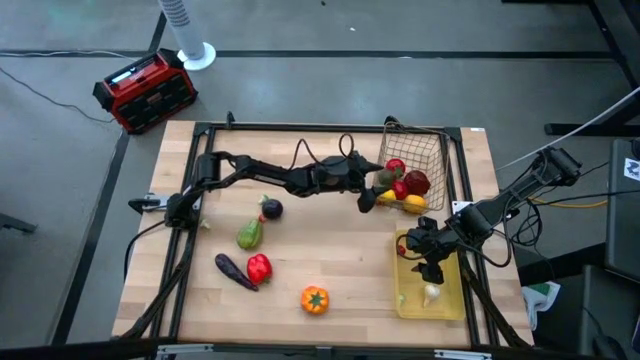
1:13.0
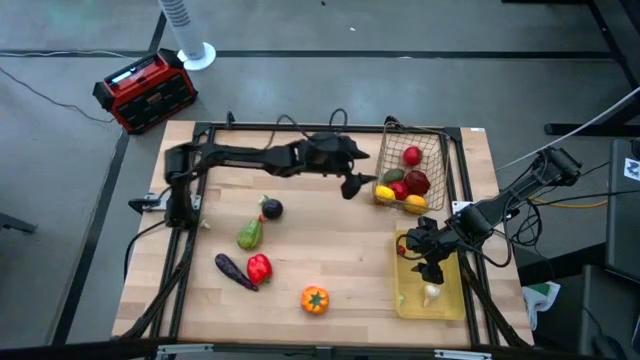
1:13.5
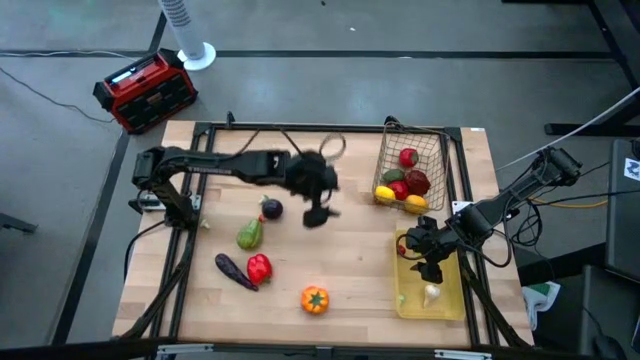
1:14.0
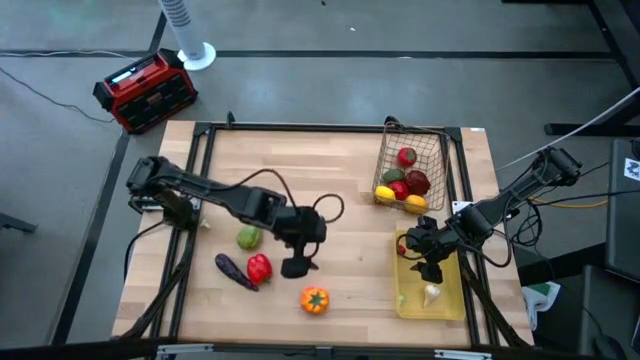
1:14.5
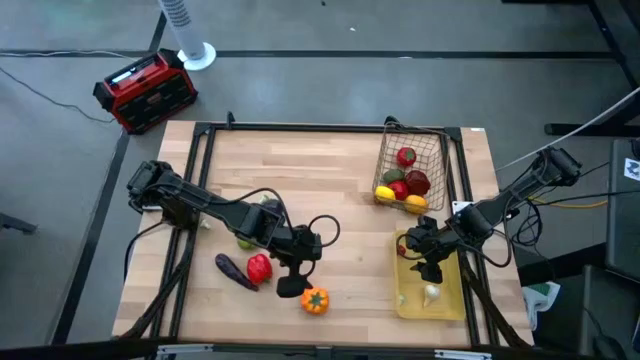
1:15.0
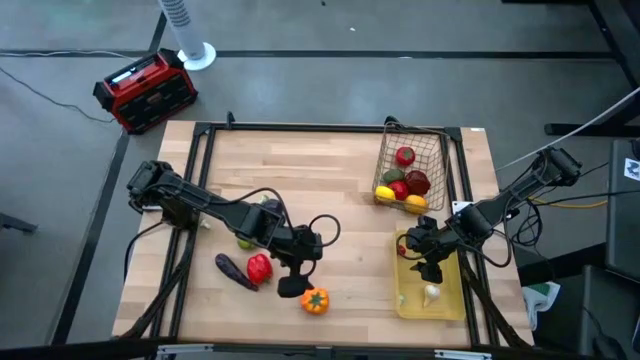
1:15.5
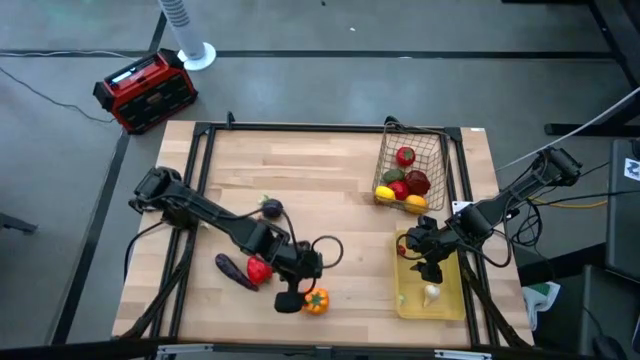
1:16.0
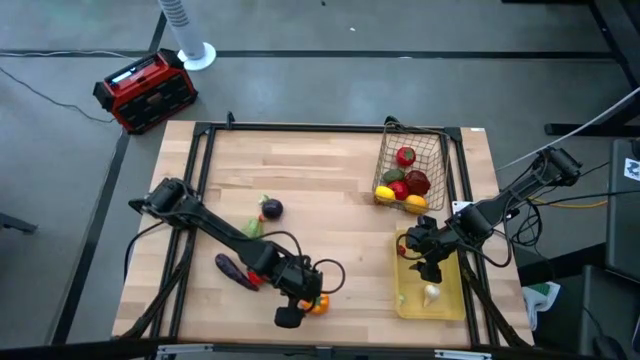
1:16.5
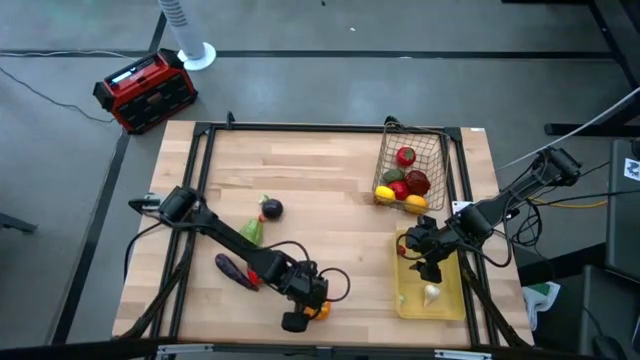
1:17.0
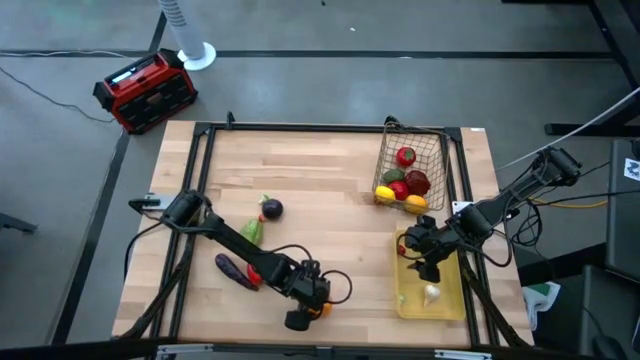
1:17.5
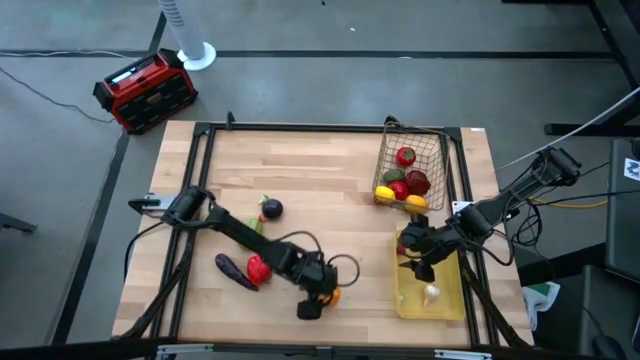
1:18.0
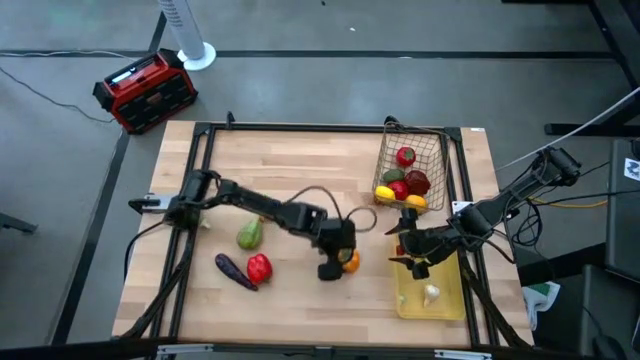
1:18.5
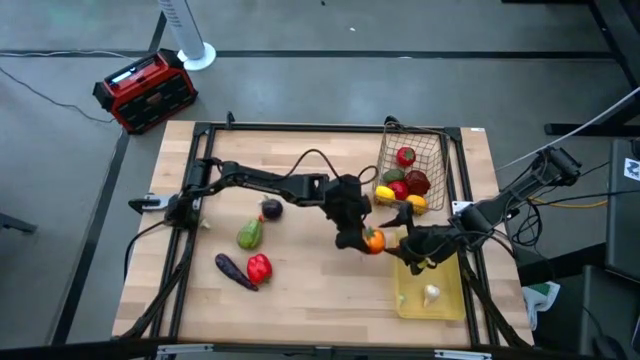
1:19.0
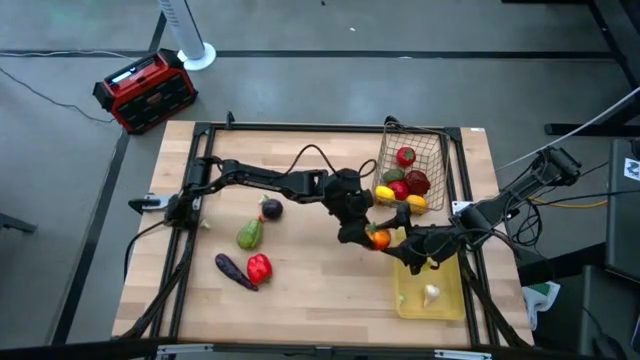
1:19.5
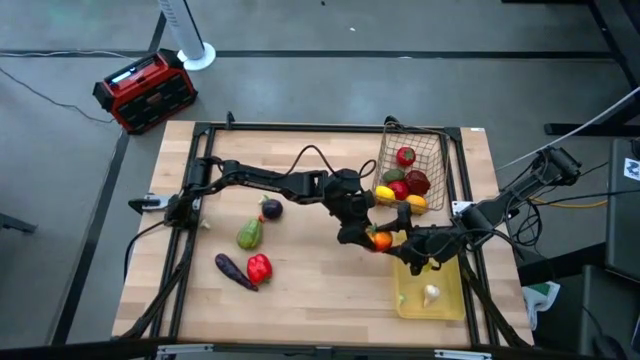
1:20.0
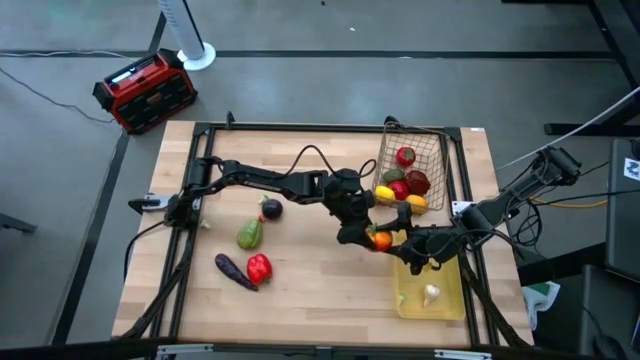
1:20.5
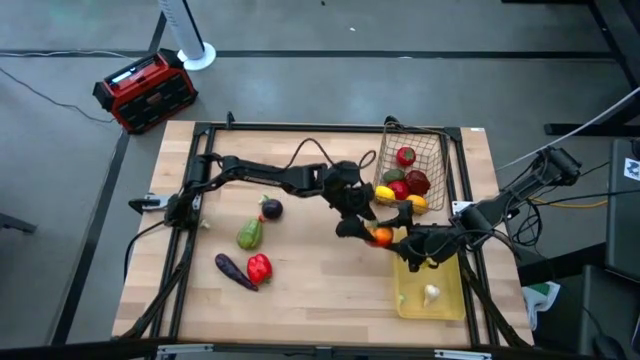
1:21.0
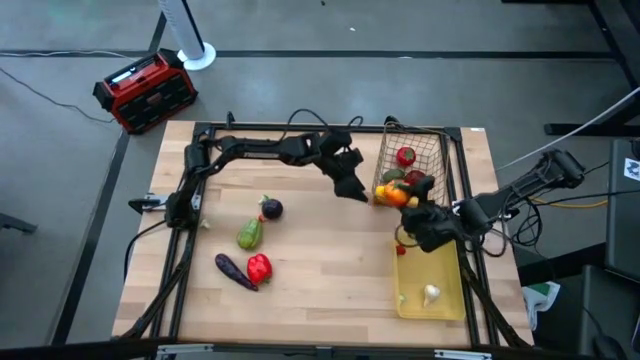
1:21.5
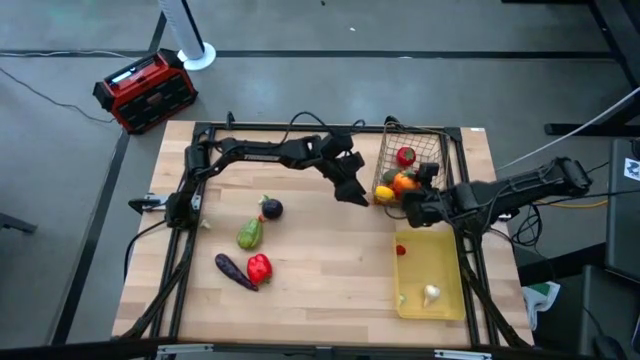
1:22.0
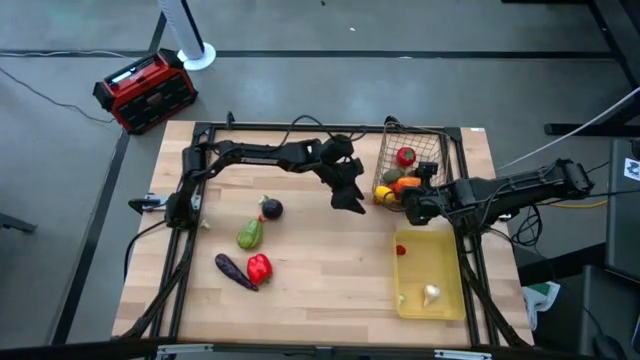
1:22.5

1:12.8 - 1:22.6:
Task: Sort produce into baskets
Put the orange tomato into the wired basket

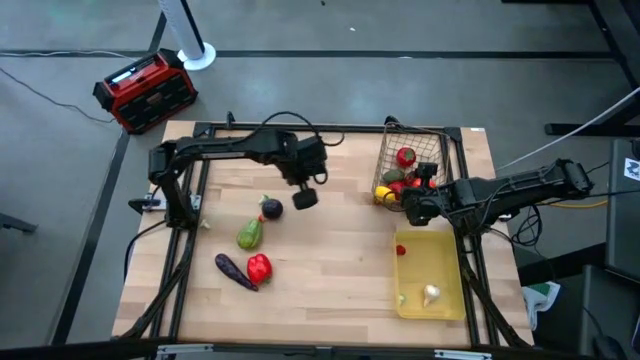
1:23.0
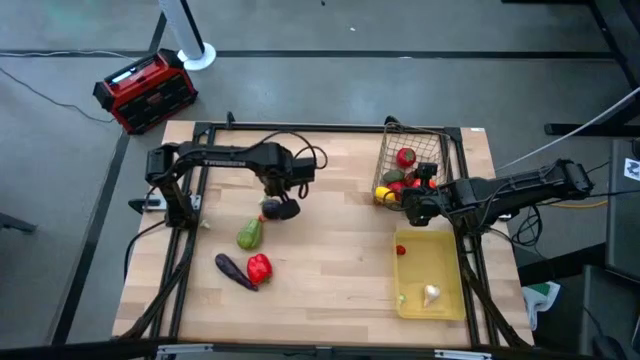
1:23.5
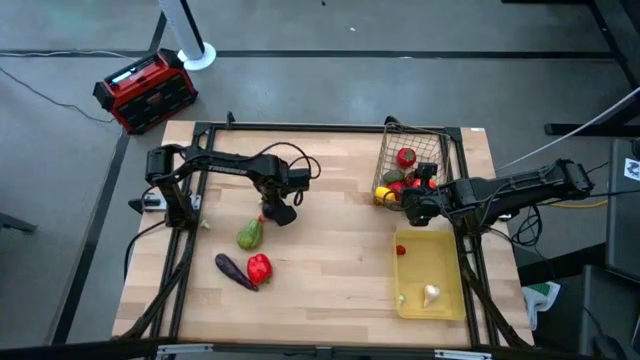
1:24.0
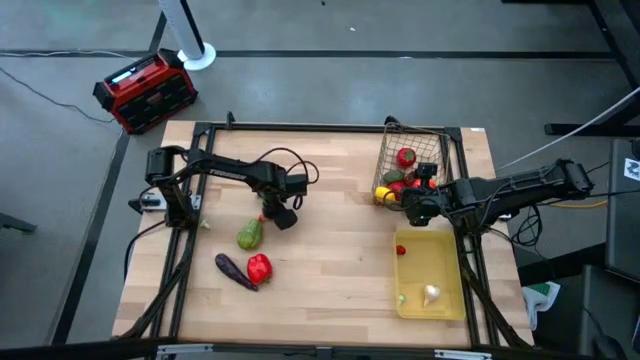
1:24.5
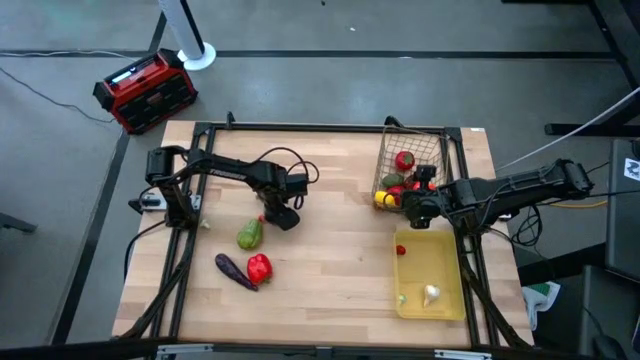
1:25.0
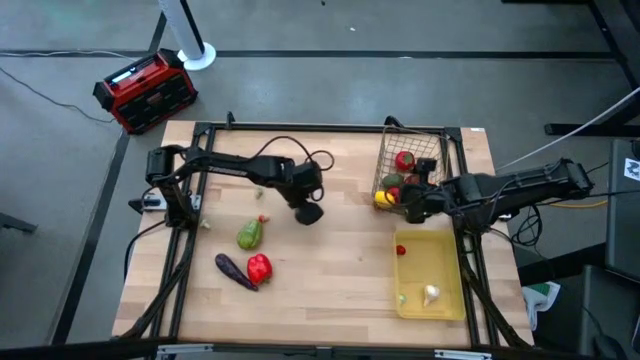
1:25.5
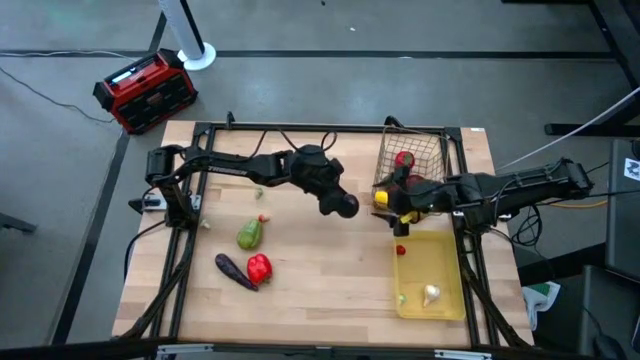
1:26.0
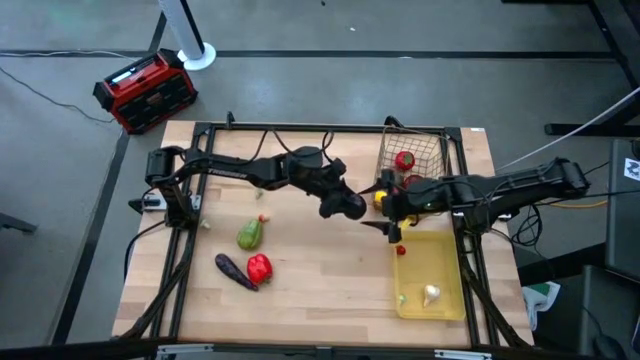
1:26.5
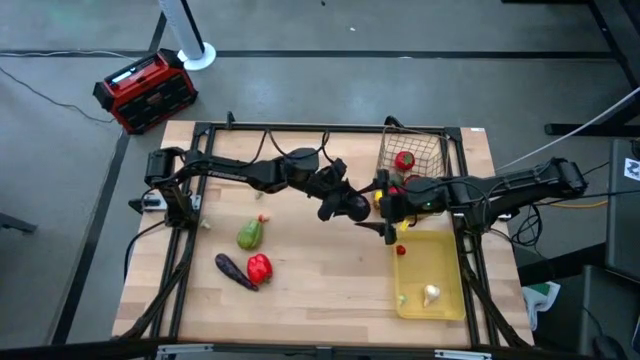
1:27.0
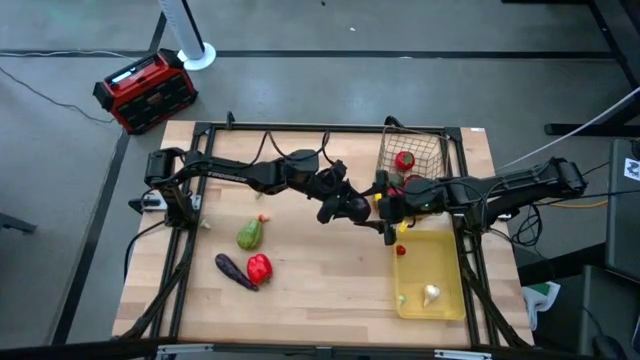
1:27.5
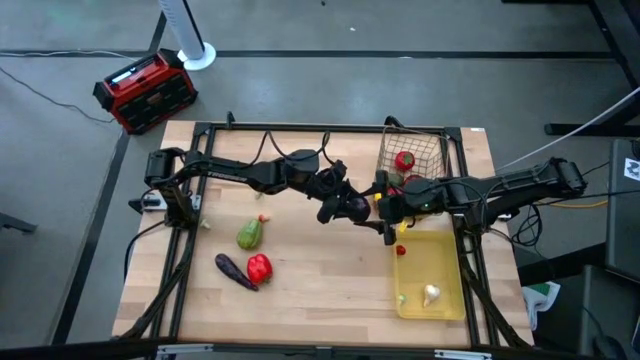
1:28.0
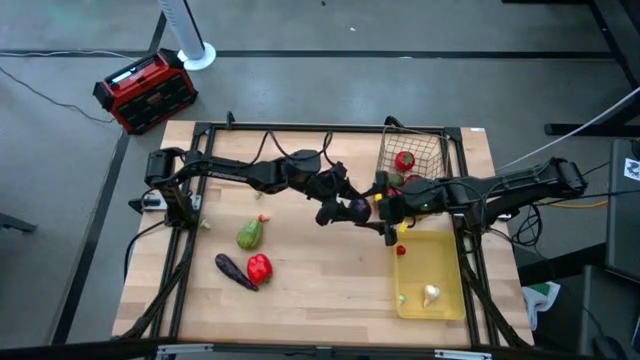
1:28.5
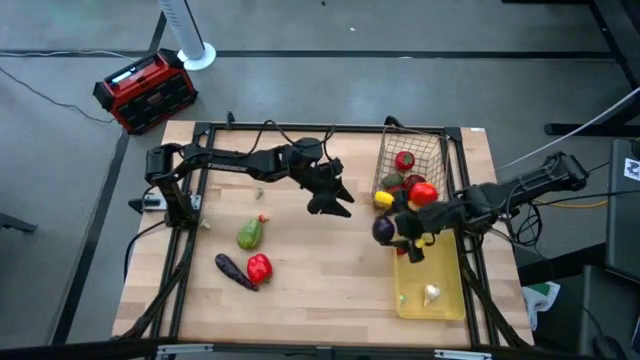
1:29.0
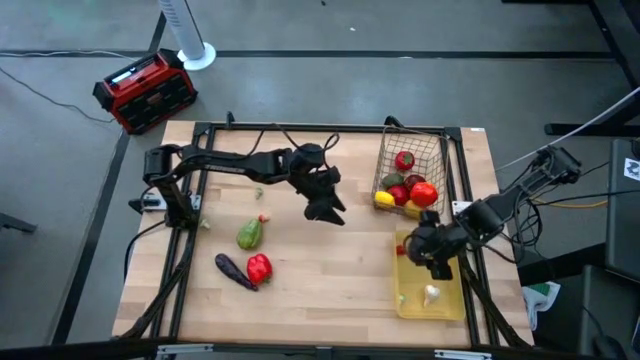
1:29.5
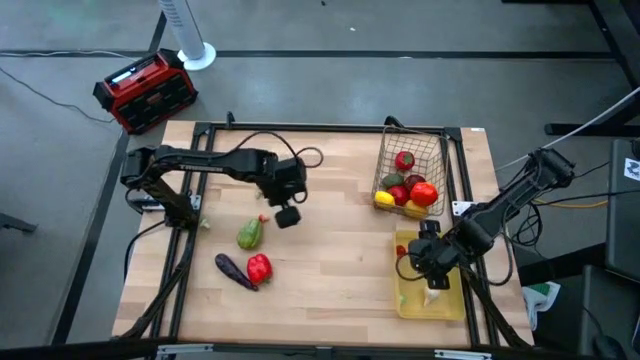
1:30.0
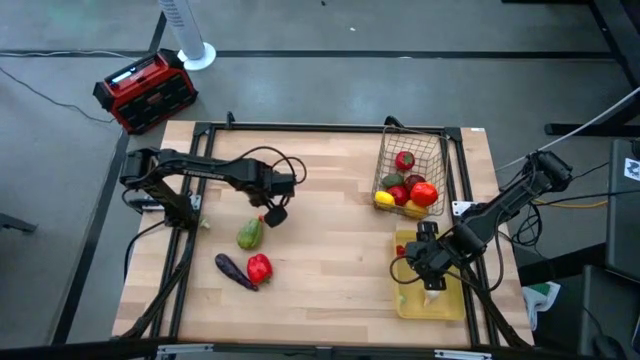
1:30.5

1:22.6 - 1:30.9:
Put the onion into the yellow bin

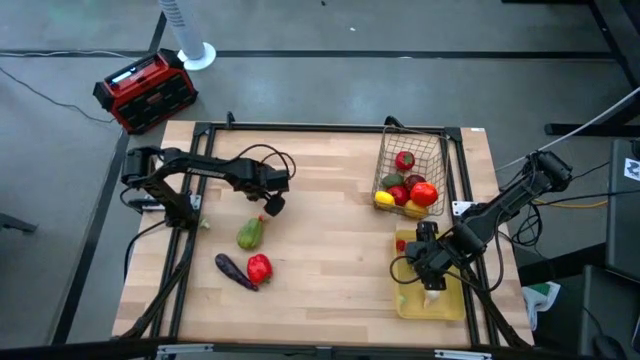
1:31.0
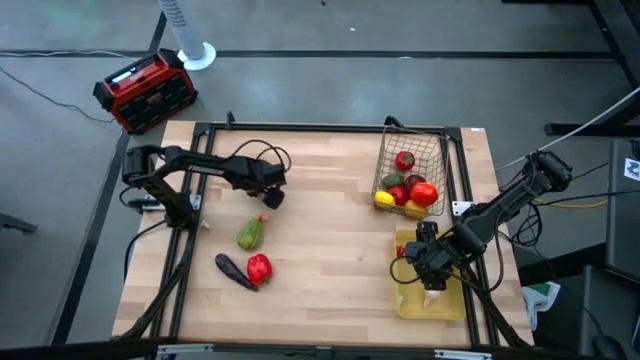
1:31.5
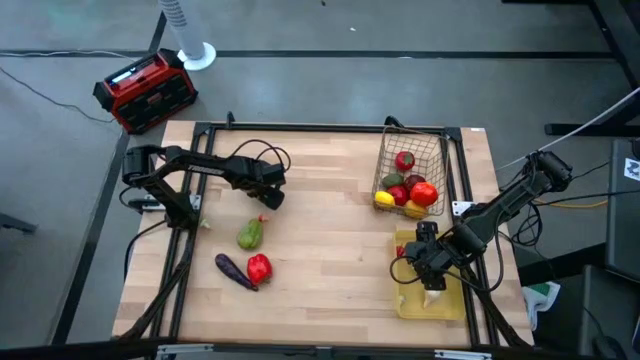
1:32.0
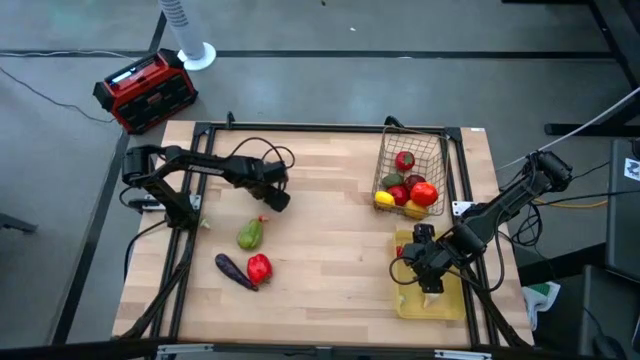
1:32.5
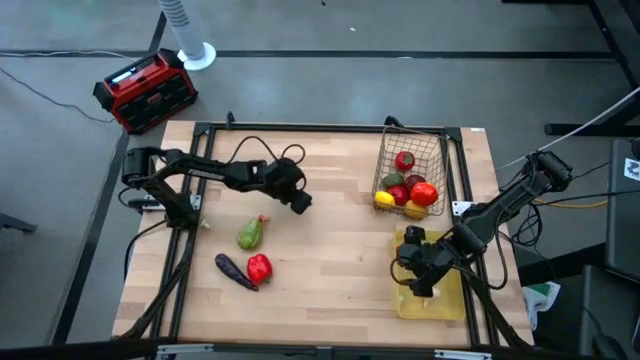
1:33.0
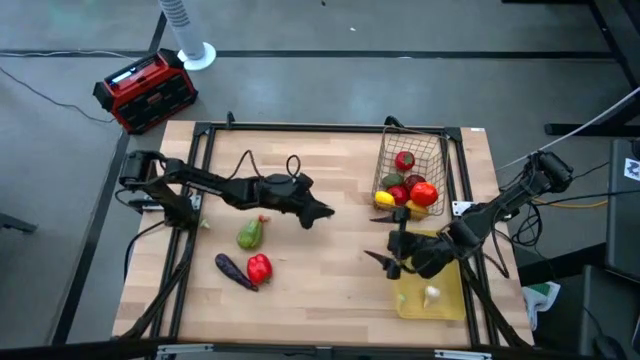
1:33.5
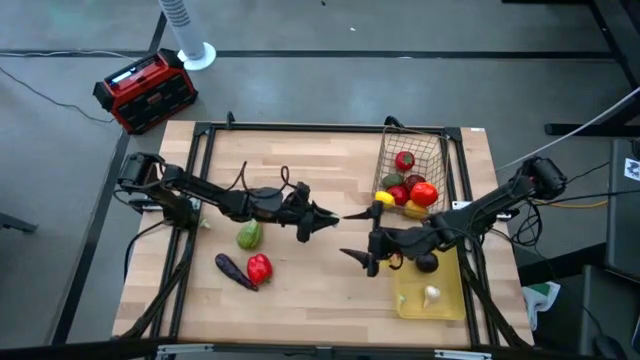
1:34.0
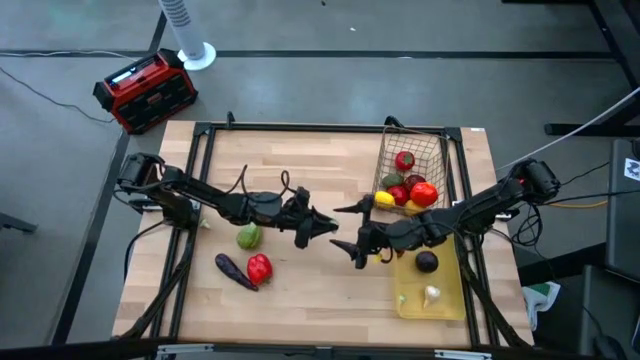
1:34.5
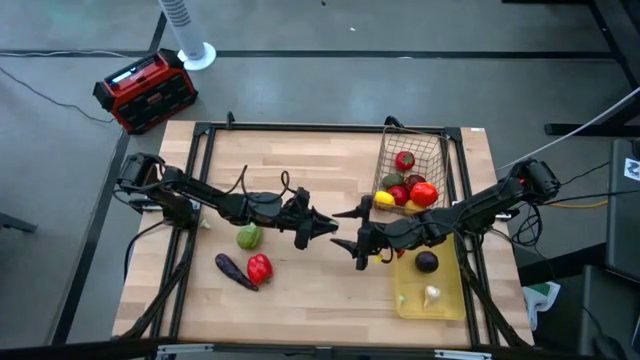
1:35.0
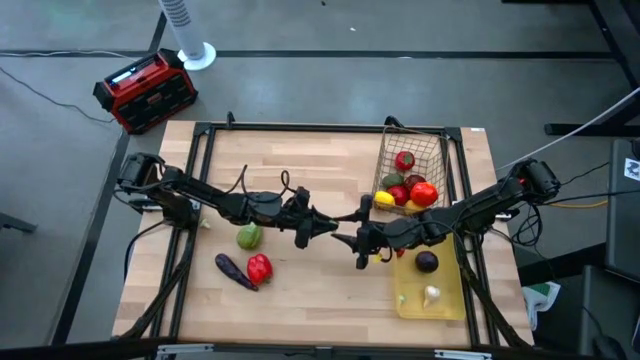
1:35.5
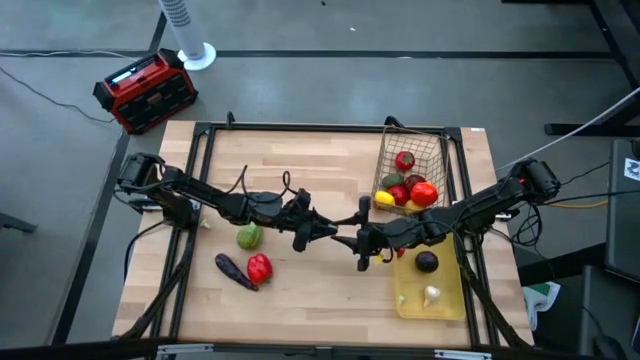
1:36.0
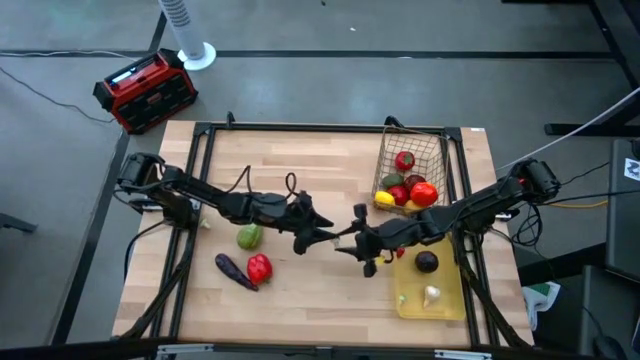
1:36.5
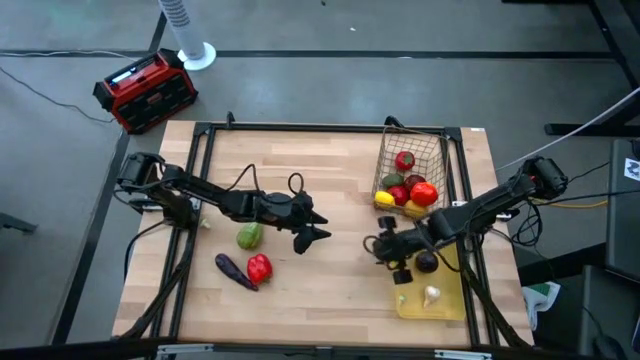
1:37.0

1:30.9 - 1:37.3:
Put the right green mushroom into the yellow bin
